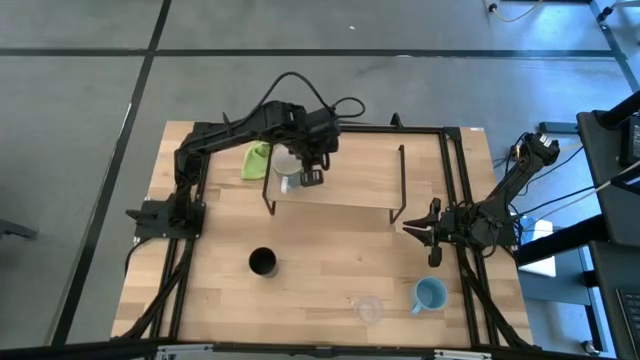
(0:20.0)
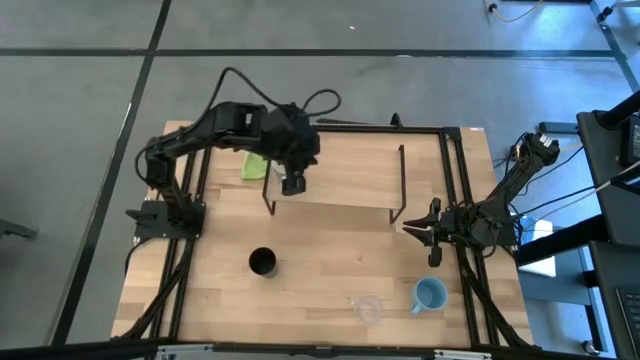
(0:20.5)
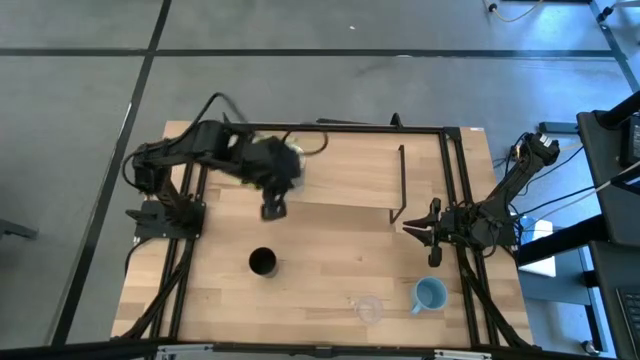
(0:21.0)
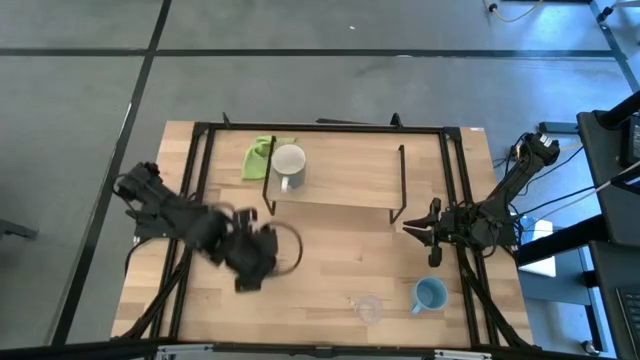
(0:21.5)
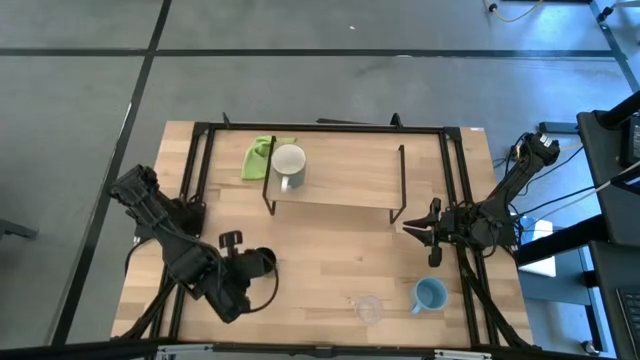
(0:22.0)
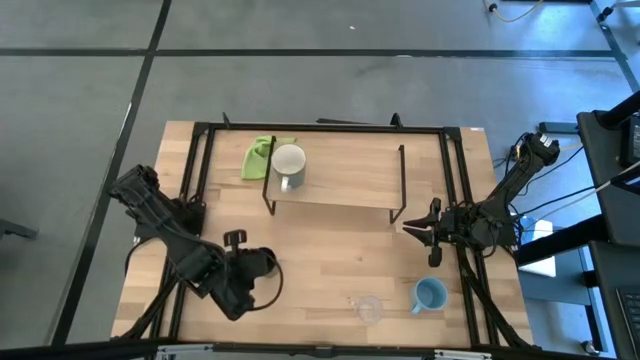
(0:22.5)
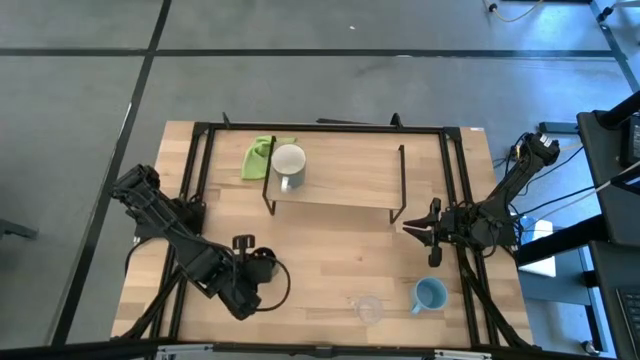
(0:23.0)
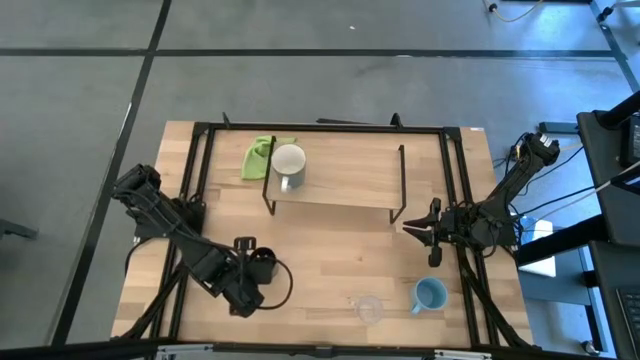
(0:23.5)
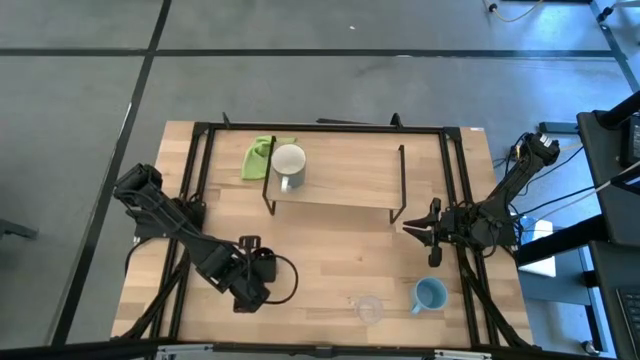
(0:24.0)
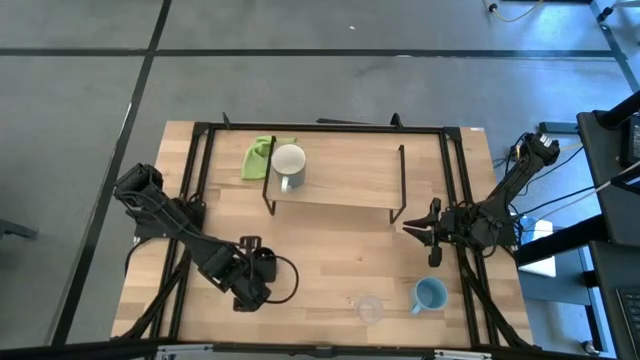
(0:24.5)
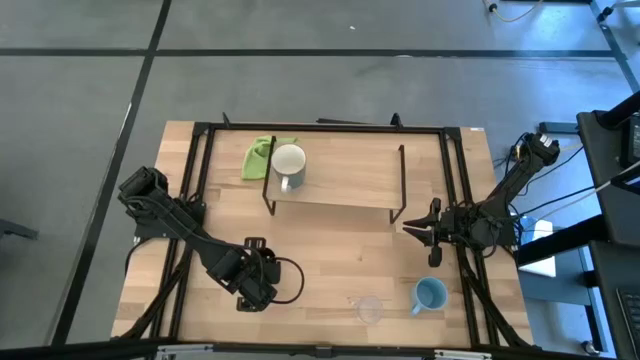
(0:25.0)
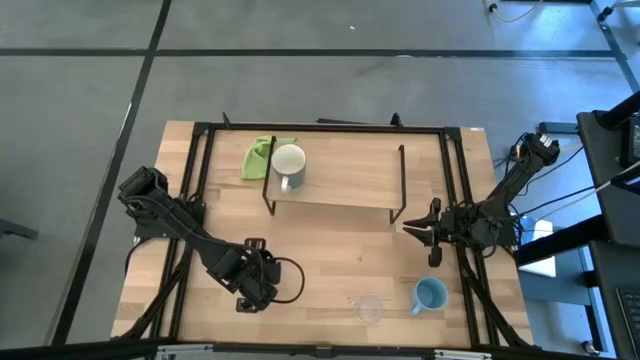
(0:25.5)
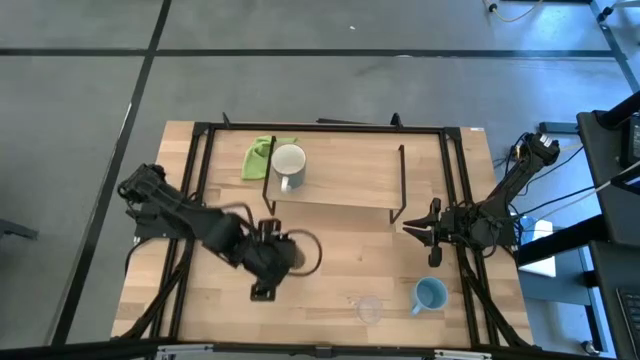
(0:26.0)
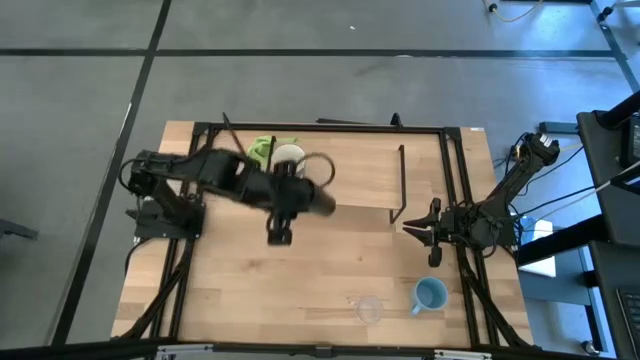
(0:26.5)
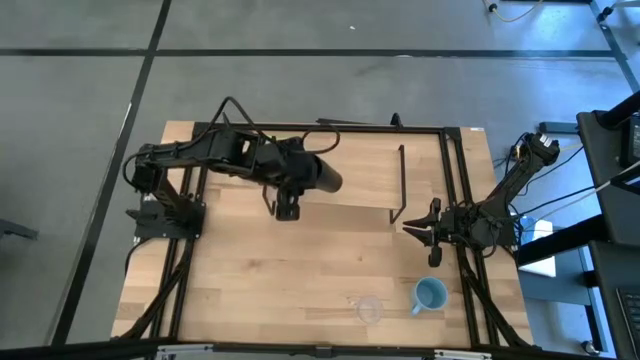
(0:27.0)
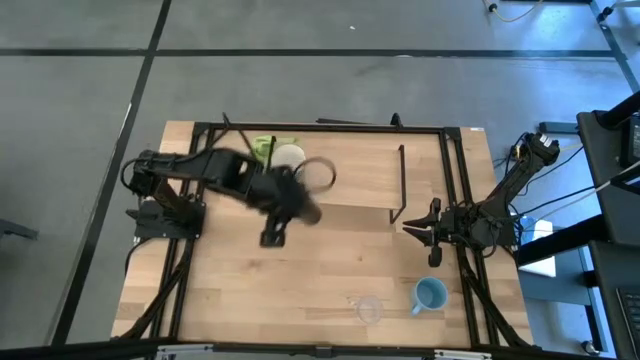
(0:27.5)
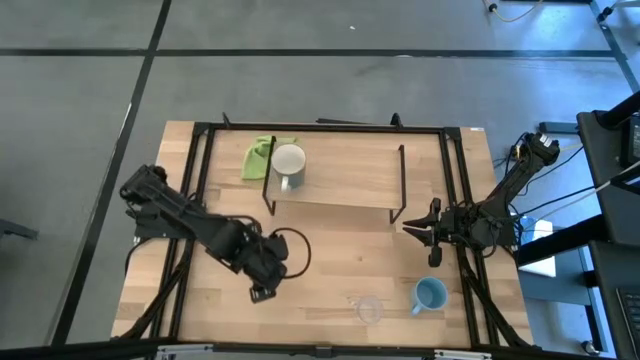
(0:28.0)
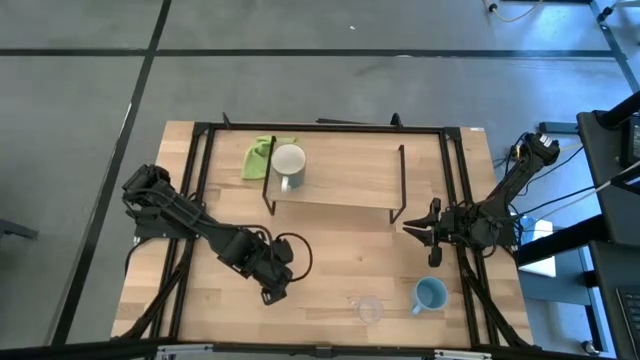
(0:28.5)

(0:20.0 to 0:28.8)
Task: Stack small to large cups/mugs on shelf
Put the black cup on the shelf

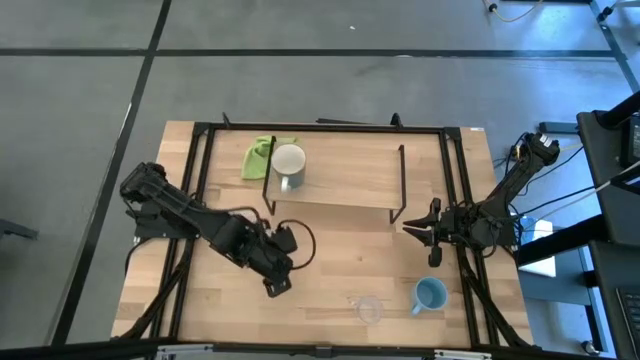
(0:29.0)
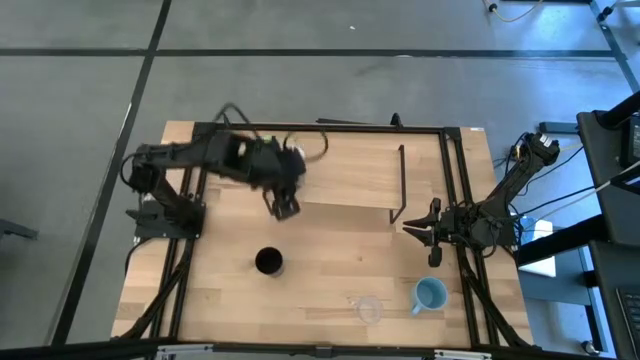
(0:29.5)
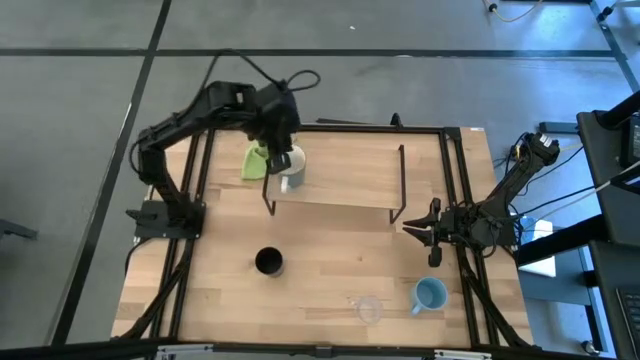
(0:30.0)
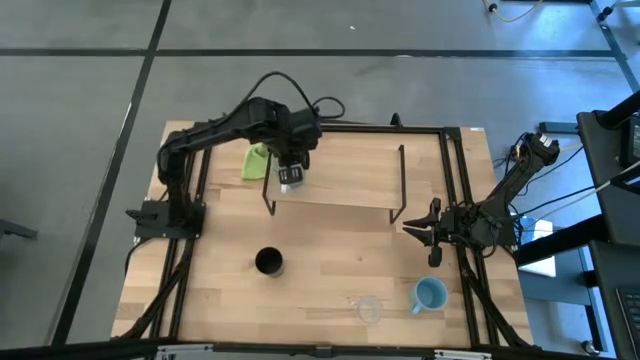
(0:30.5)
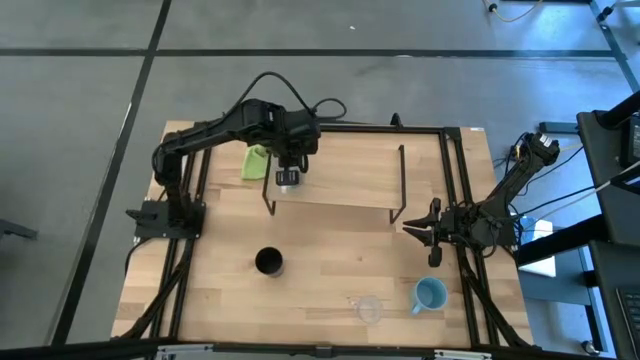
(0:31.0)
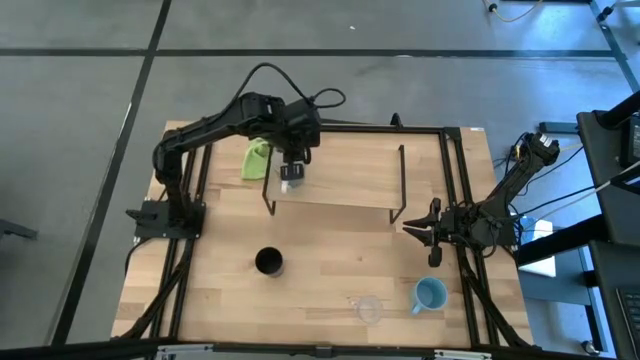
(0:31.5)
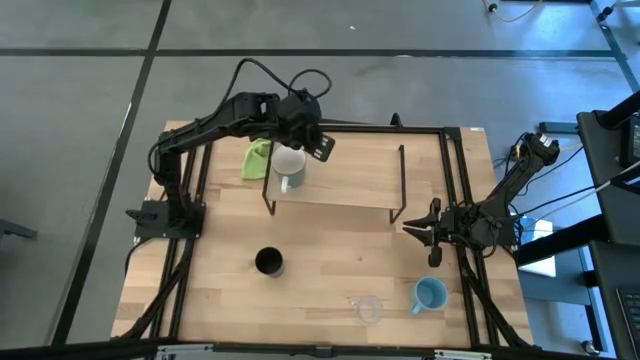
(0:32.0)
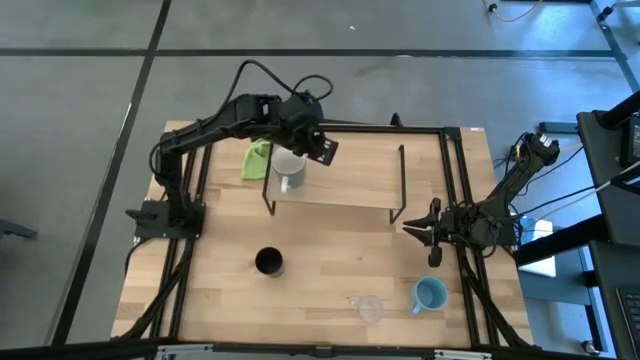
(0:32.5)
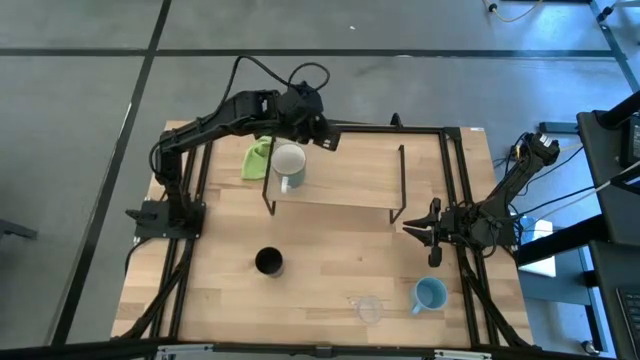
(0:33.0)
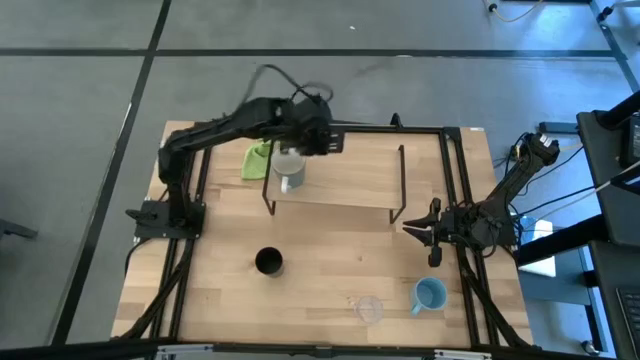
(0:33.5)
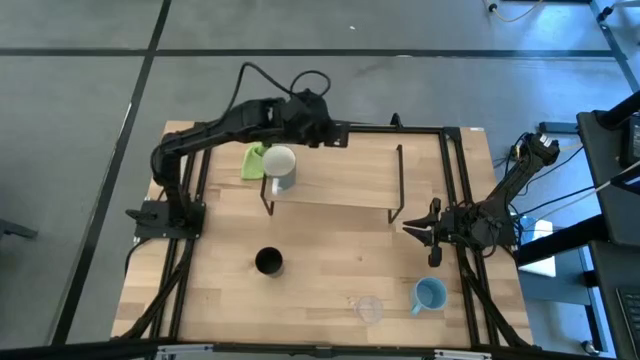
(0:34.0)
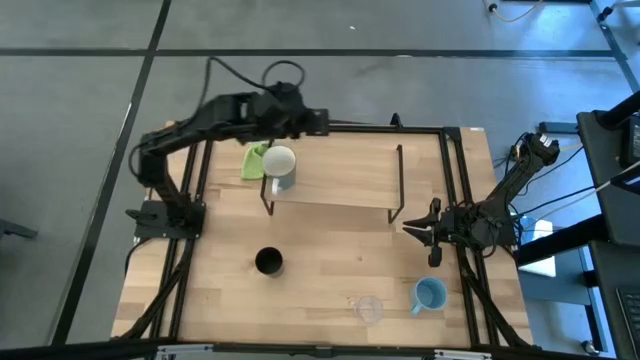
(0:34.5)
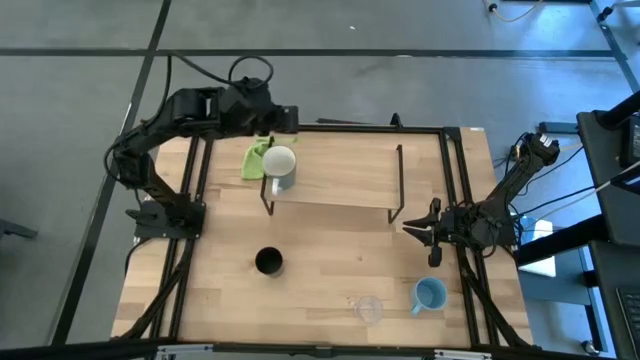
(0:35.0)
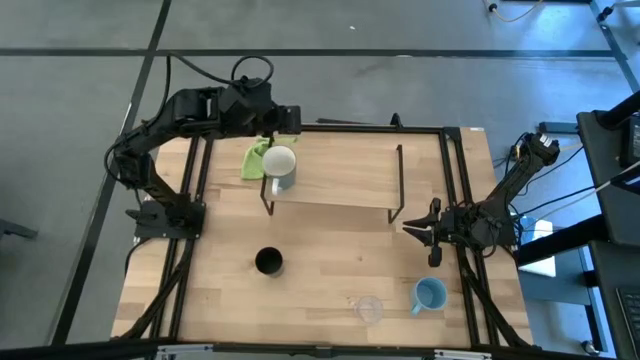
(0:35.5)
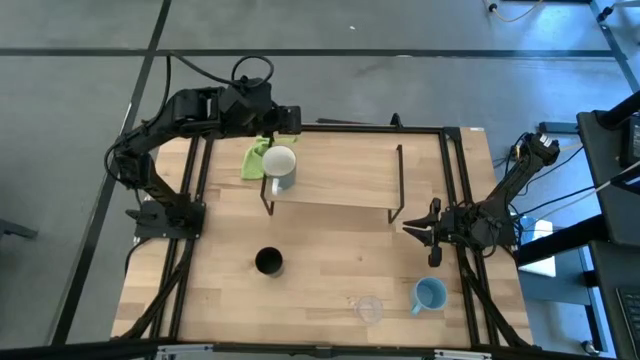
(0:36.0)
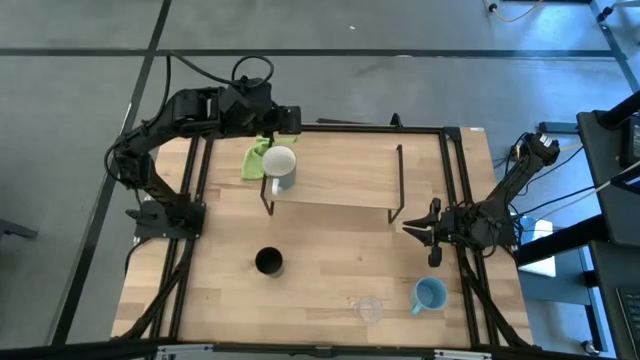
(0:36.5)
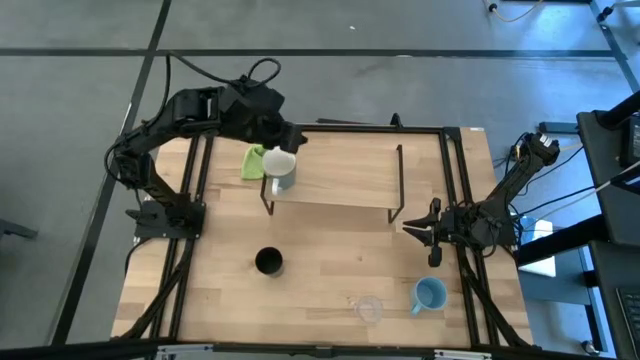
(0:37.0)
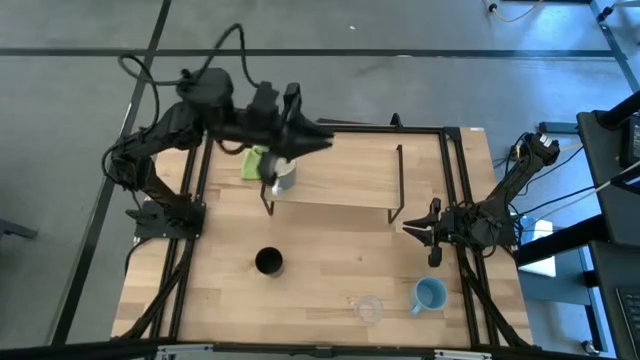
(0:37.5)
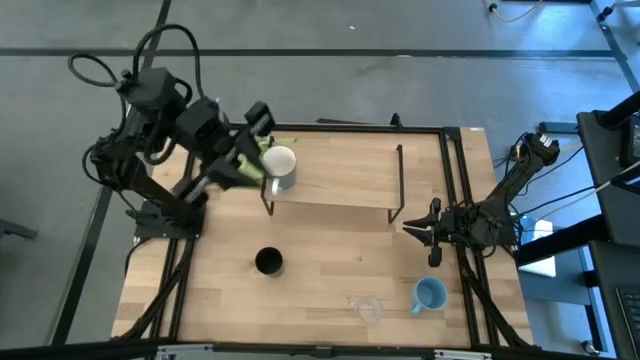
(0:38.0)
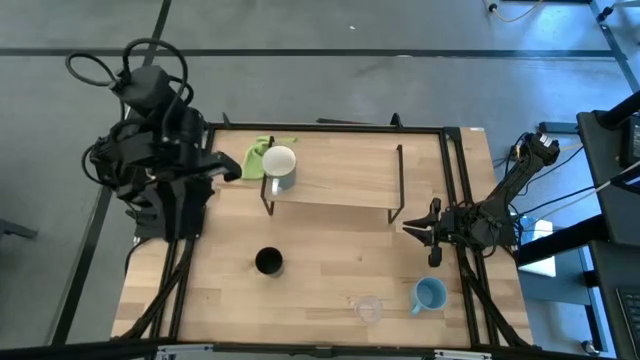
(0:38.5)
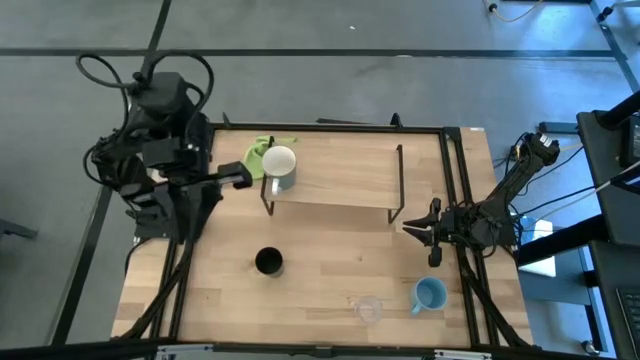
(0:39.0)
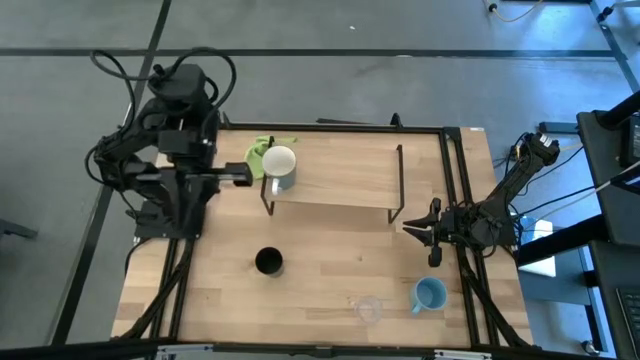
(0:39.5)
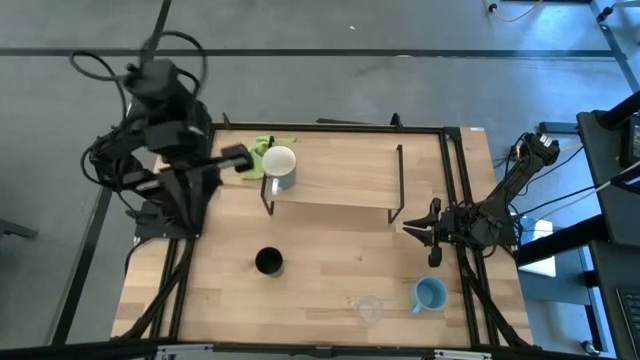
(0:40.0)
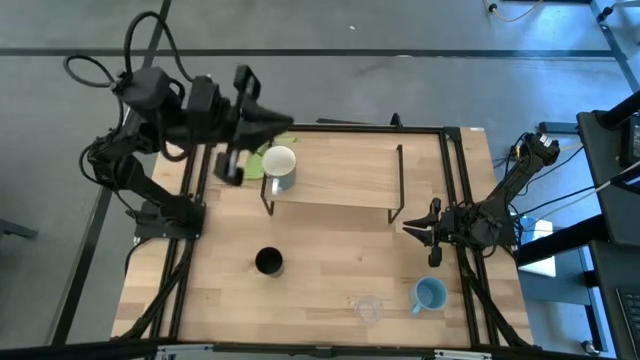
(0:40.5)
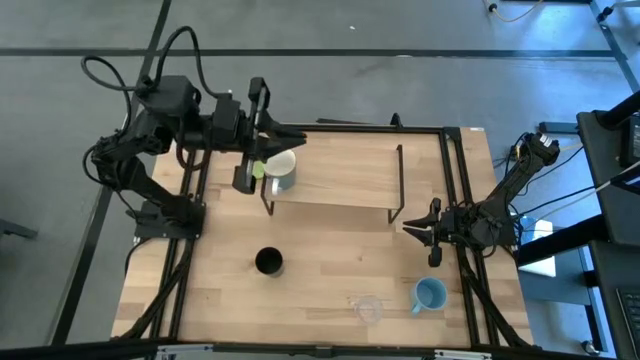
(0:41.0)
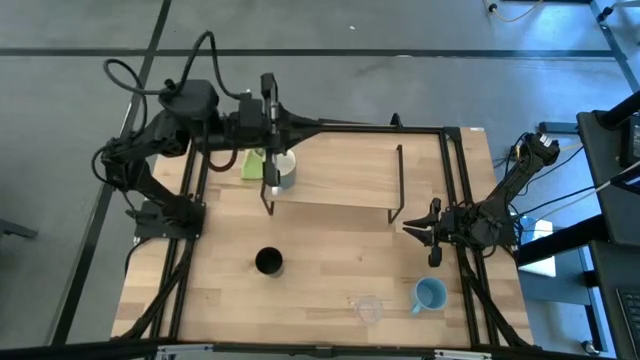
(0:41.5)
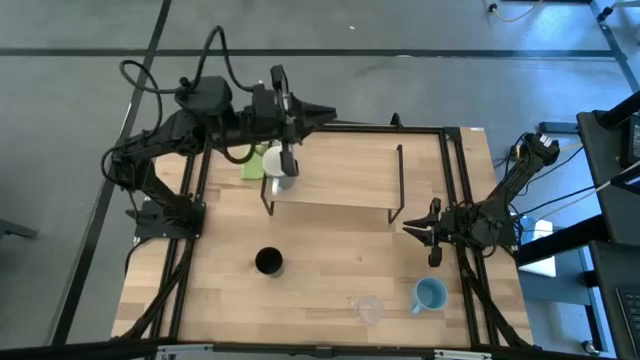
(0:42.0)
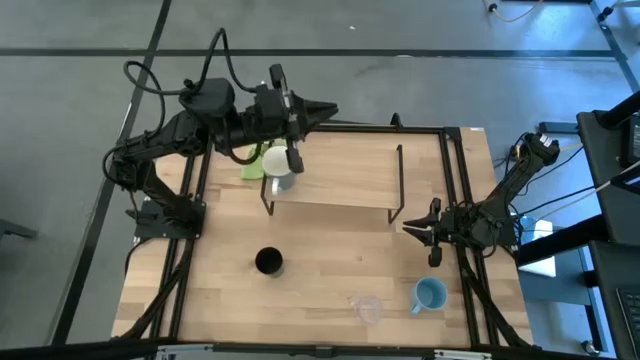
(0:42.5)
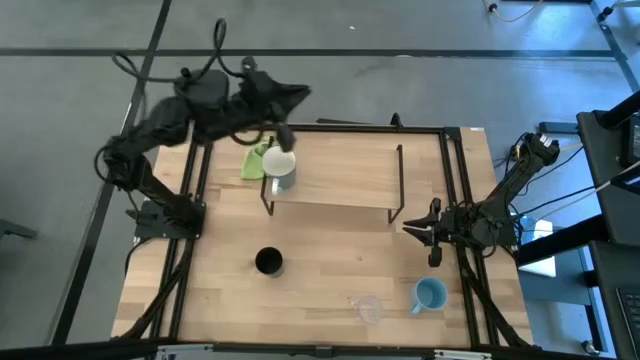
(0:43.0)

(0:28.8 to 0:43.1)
Adjust the blue mug
